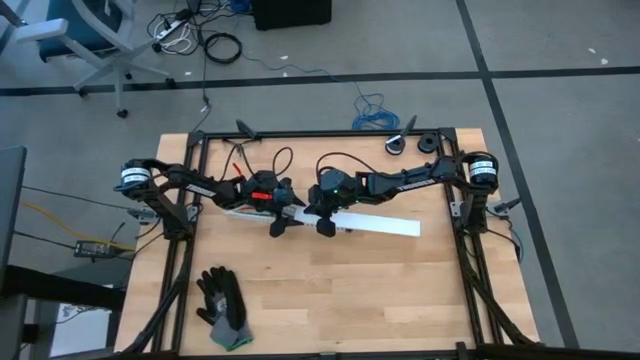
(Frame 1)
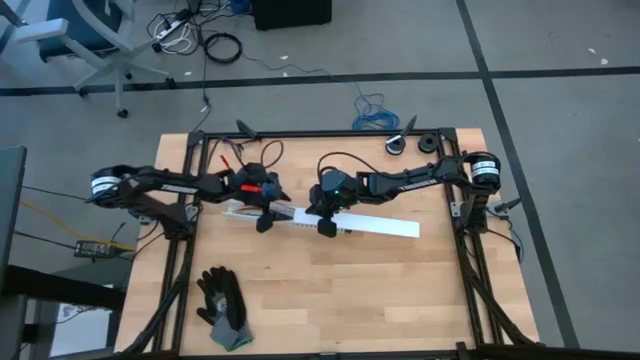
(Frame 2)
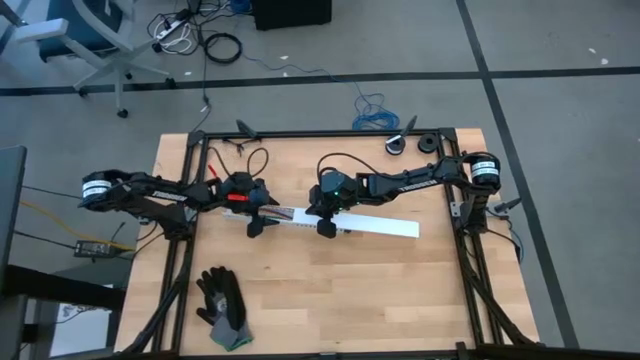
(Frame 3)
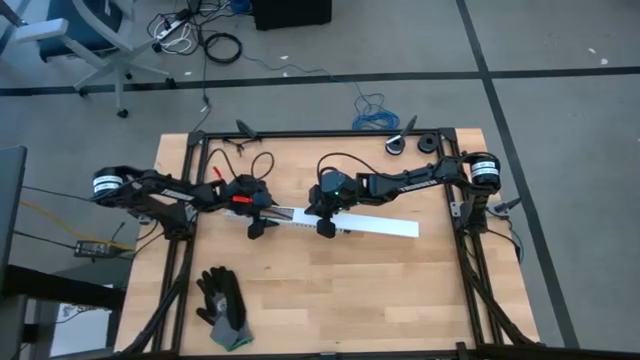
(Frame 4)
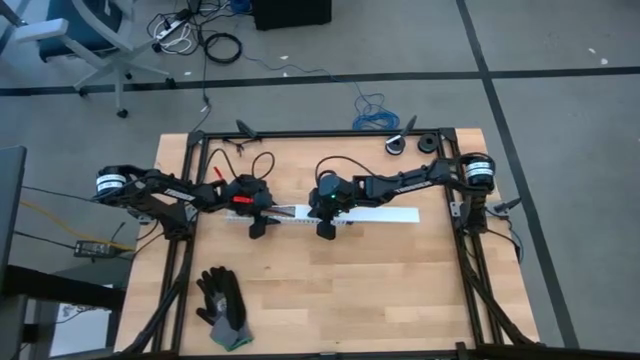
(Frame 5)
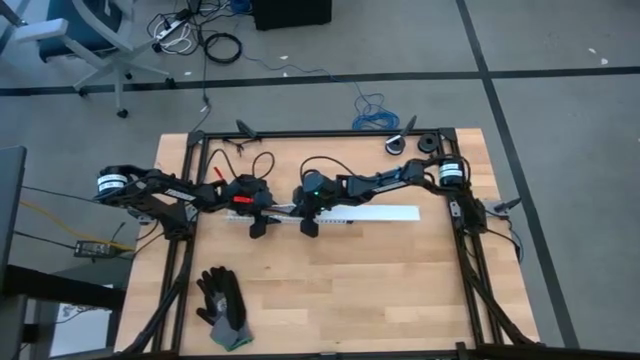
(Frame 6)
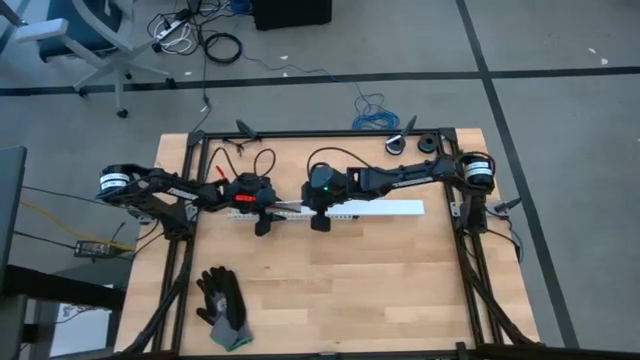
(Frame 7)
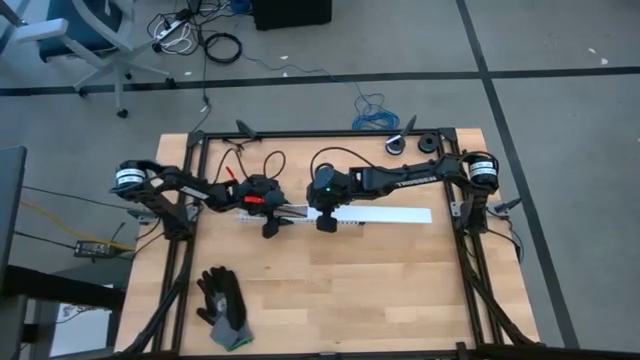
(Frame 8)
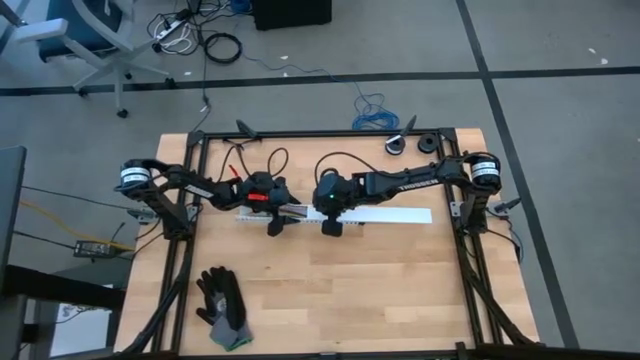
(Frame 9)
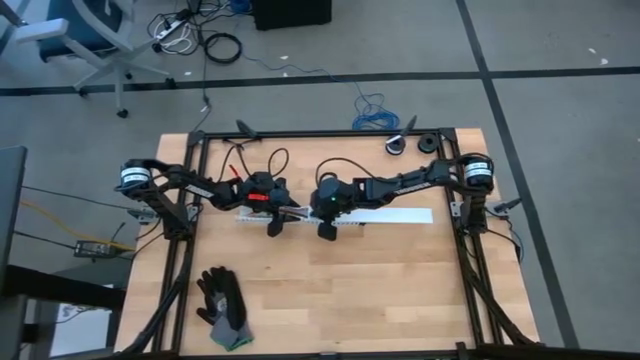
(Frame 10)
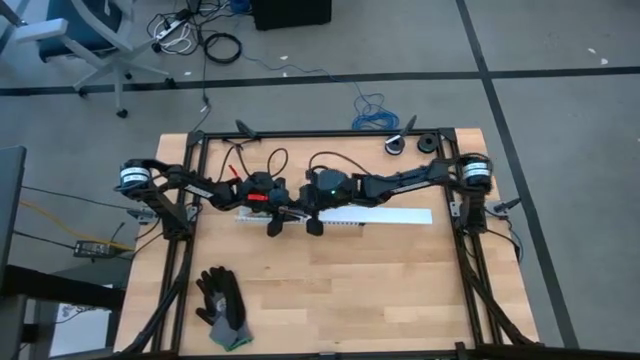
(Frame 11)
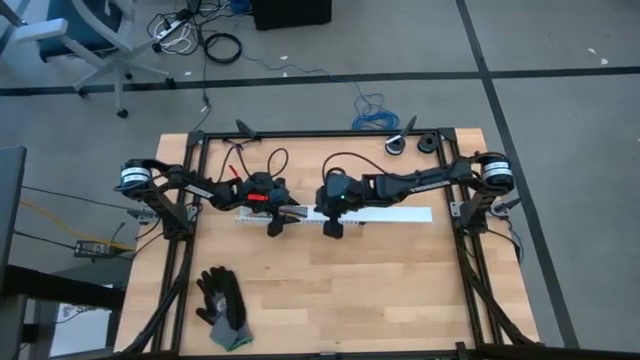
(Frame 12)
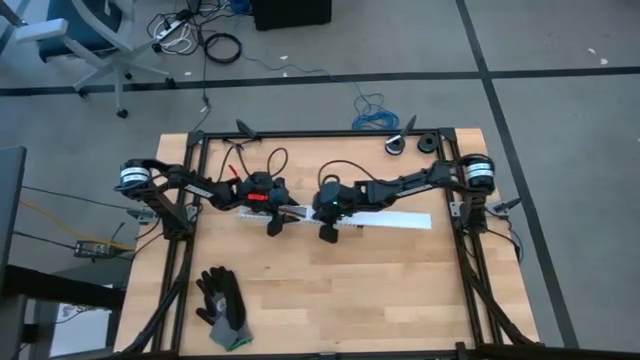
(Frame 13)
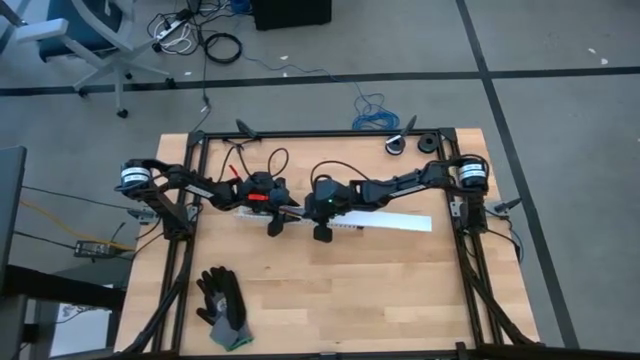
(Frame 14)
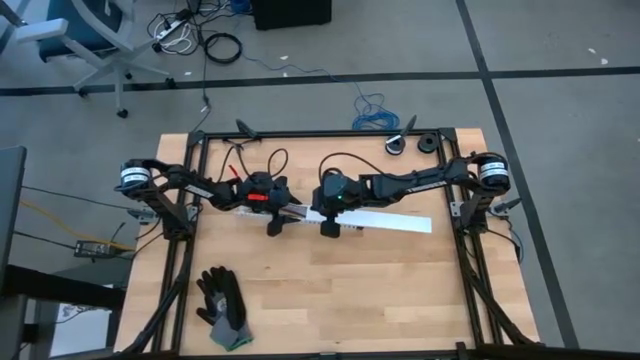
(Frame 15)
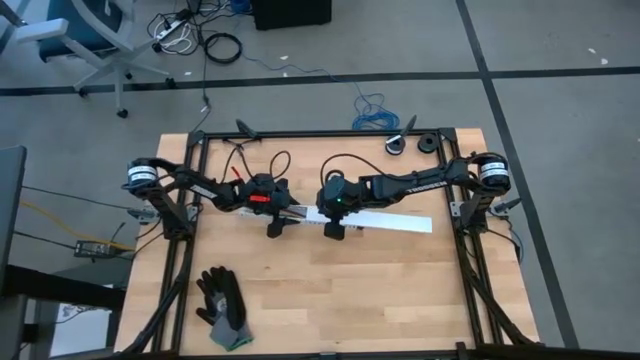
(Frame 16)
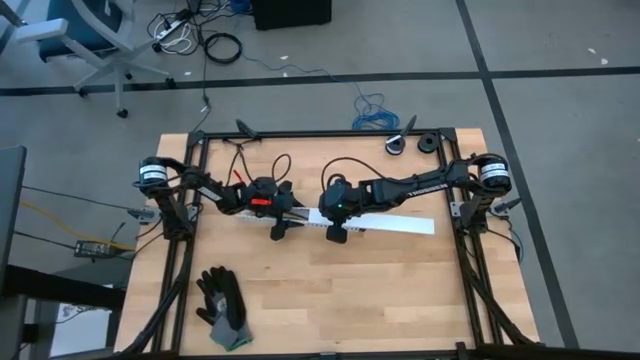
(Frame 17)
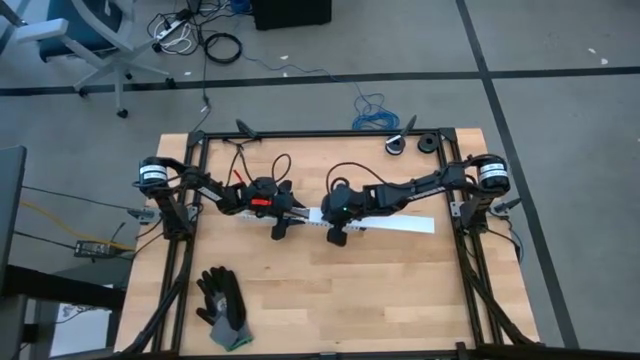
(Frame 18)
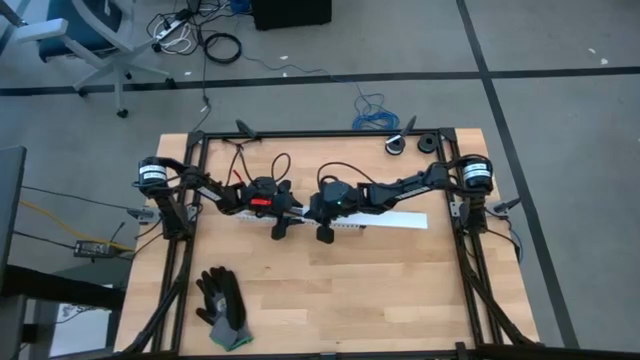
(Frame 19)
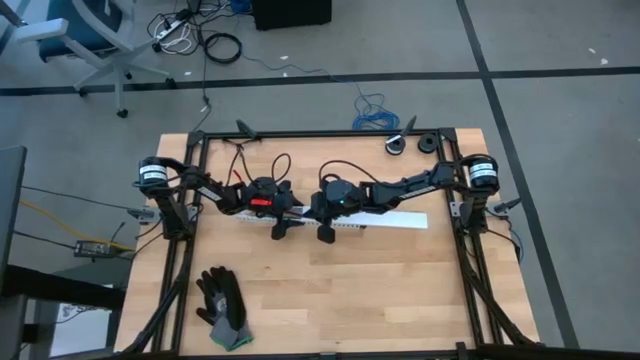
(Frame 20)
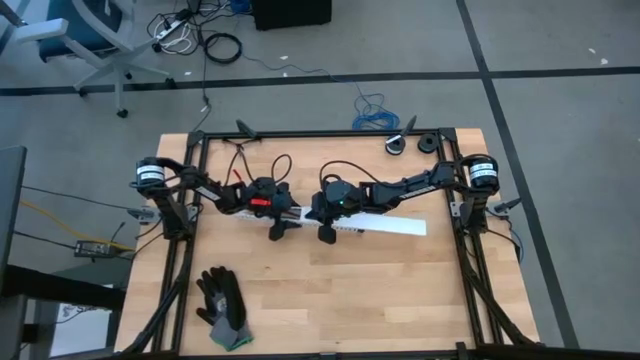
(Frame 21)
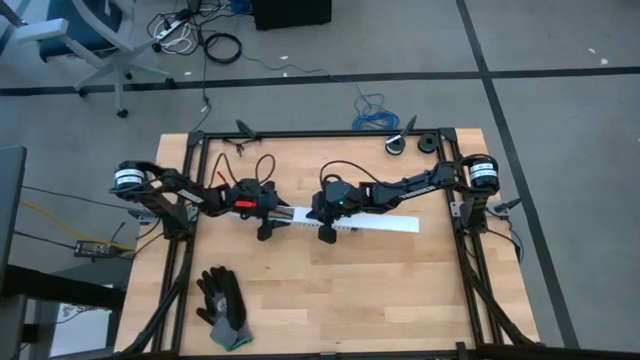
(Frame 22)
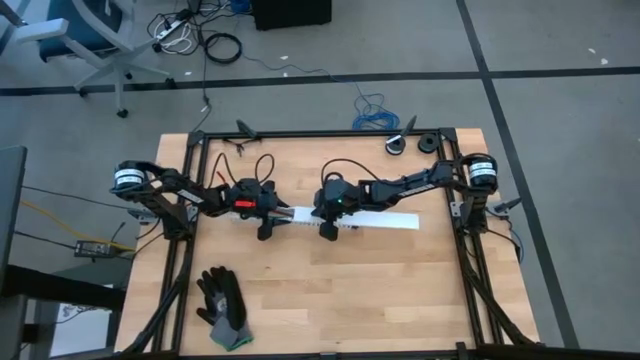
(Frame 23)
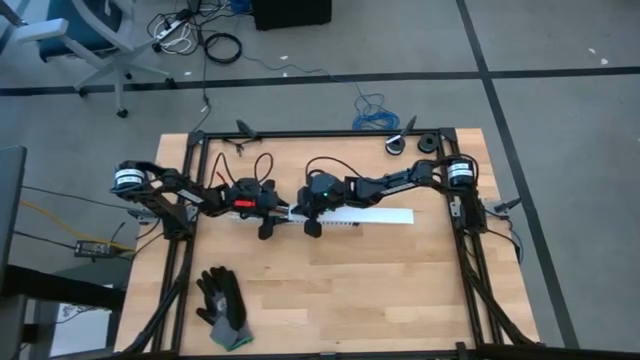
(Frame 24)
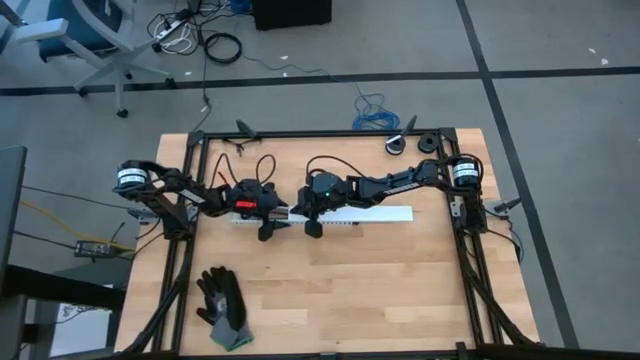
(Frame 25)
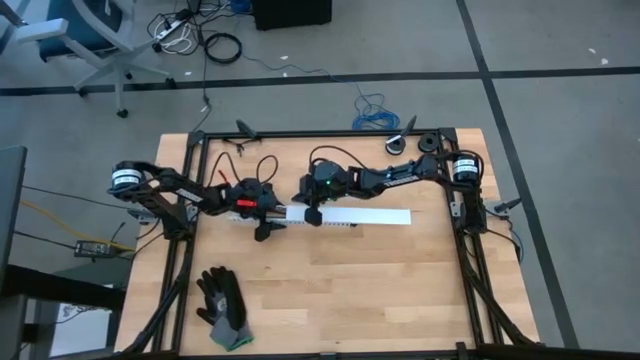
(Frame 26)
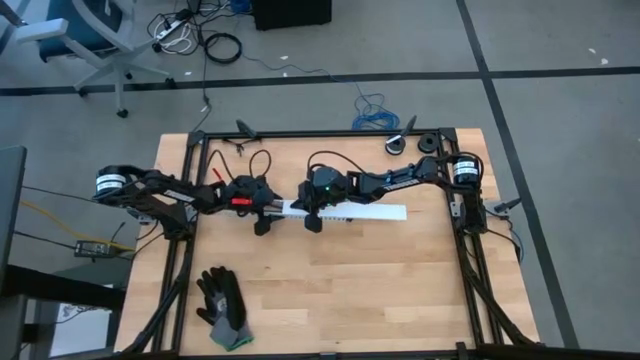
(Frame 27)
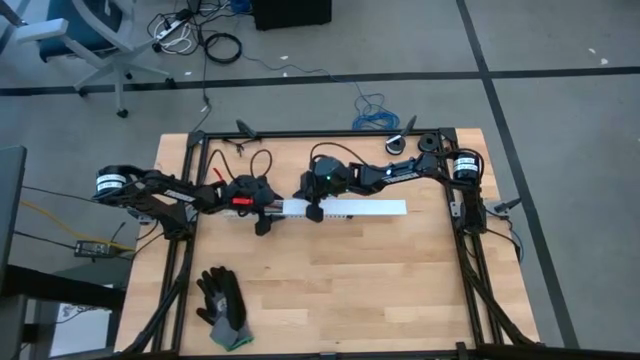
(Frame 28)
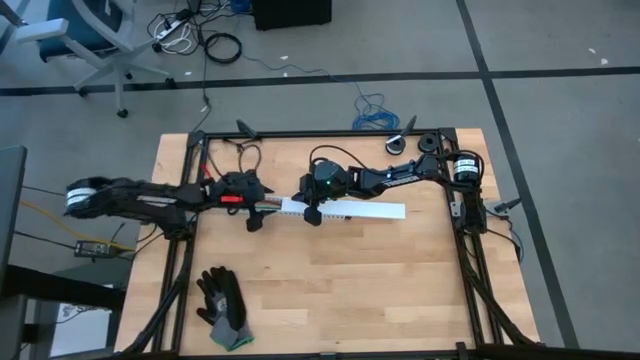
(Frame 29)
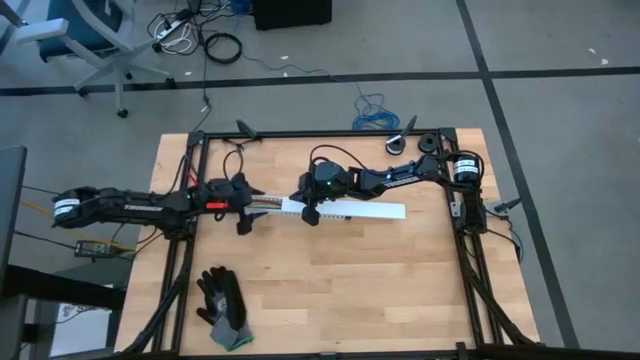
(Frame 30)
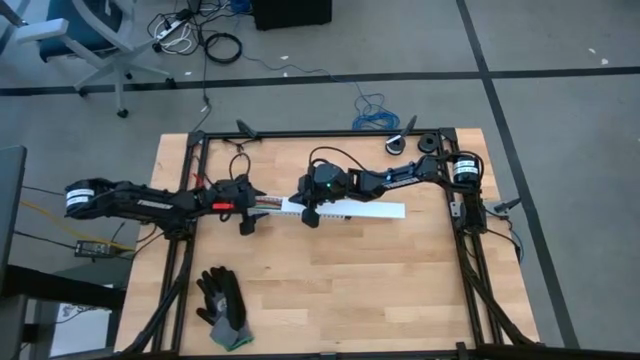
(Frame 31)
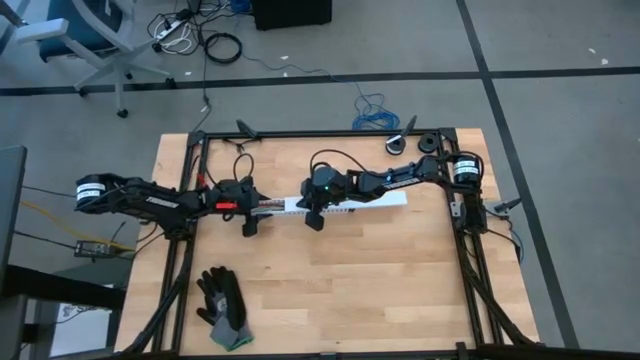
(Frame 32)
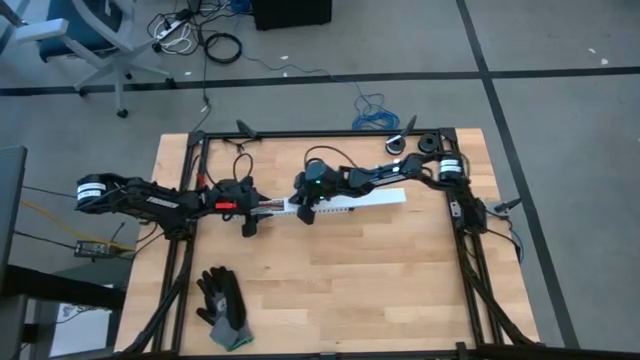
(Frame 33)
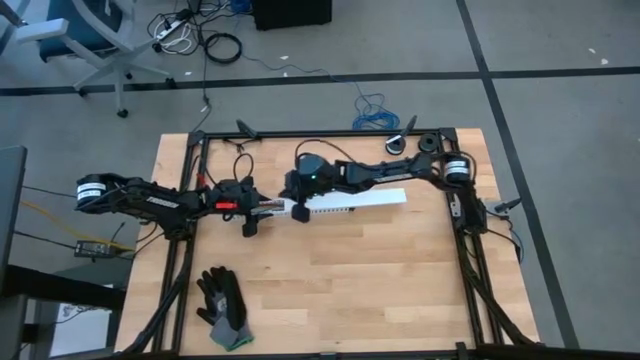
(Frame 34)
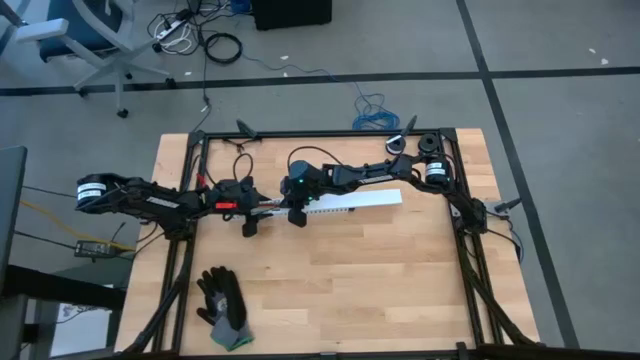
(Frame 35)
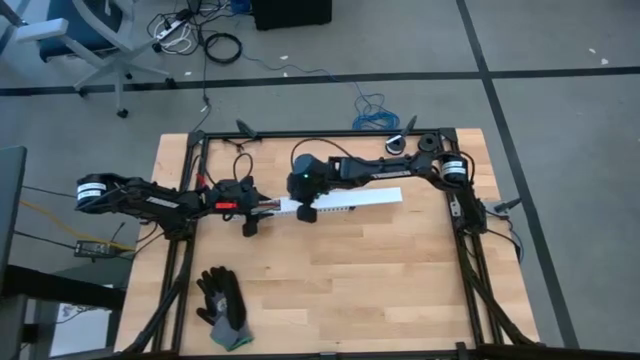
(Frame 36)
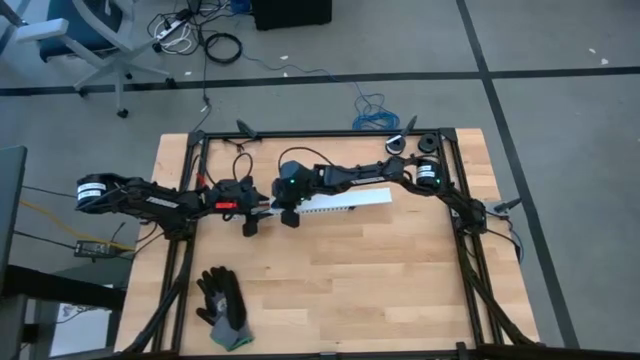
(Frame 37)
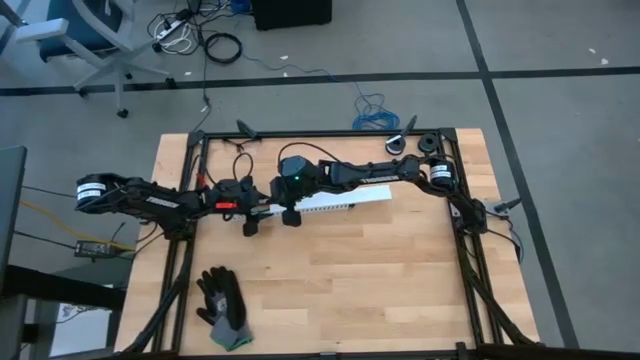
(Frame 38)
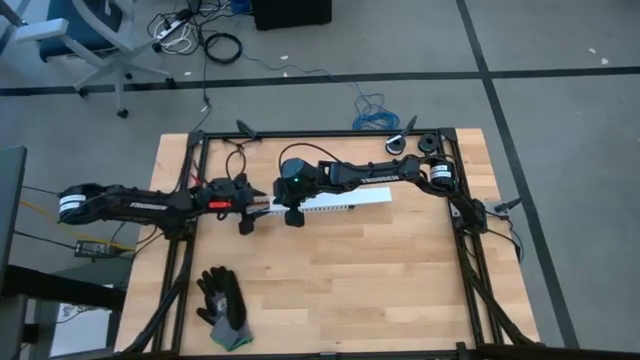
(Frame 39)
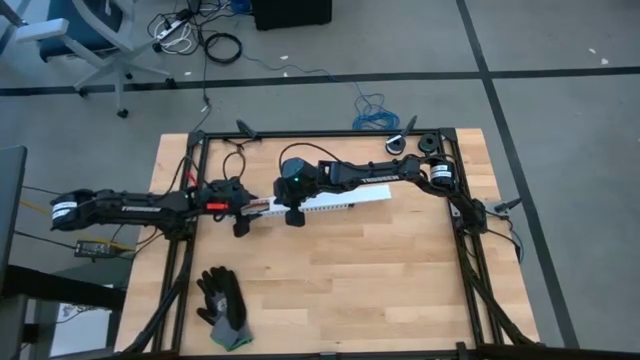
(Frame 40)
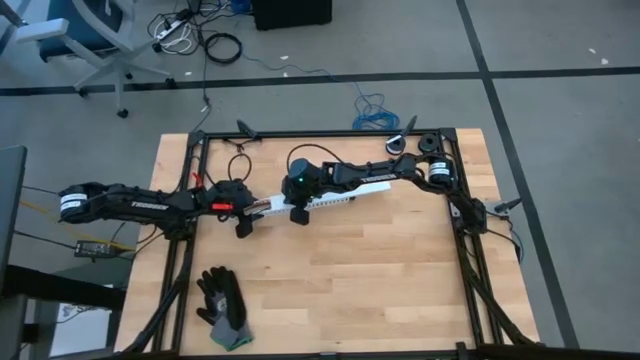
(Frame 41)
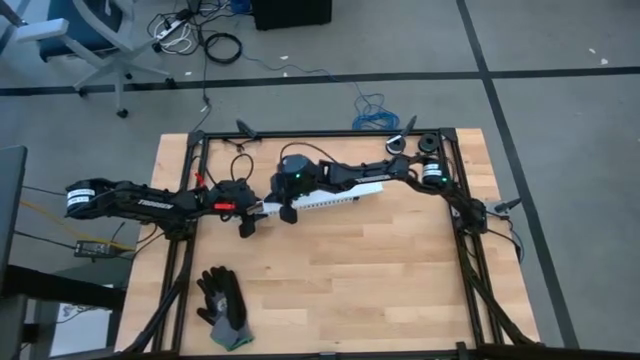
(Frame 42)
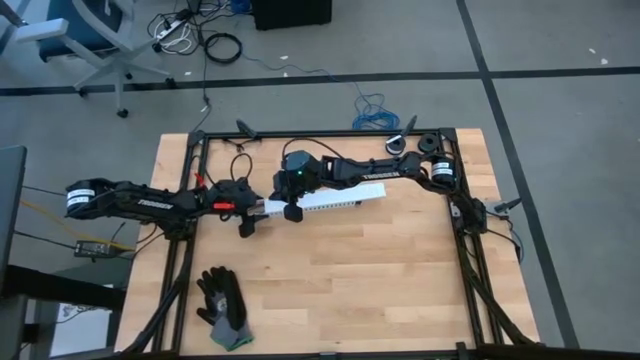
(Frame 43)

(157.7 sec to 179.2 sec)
Task: Ziptie cables
Close the white cable duct with the cover
